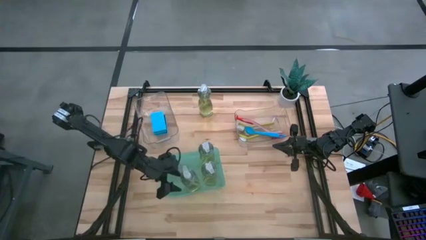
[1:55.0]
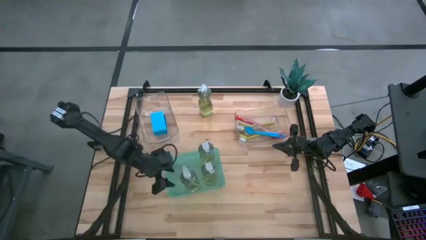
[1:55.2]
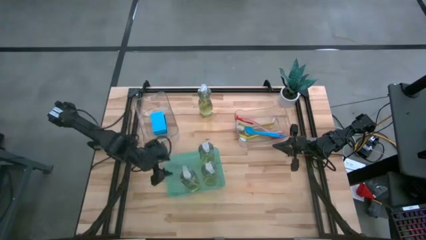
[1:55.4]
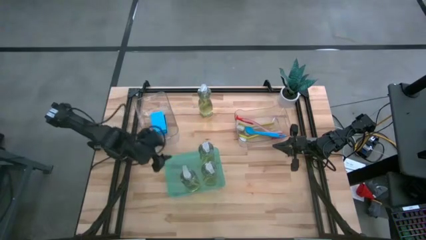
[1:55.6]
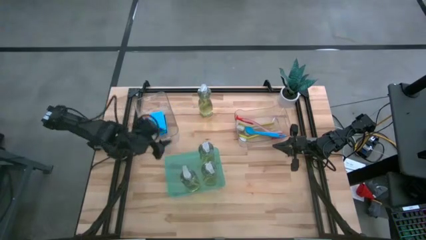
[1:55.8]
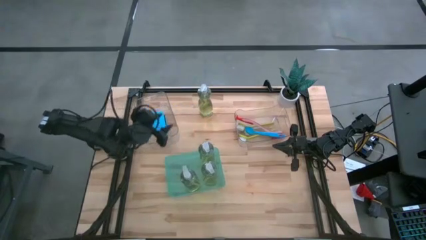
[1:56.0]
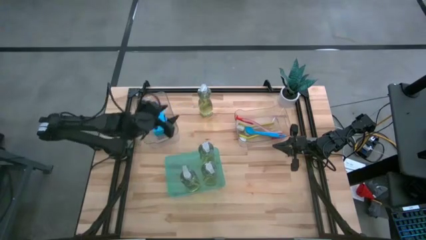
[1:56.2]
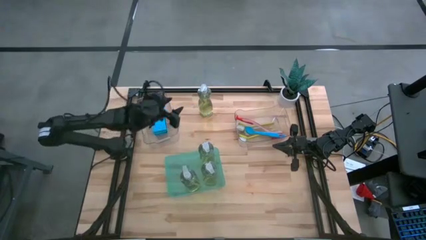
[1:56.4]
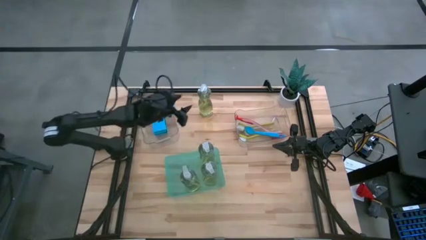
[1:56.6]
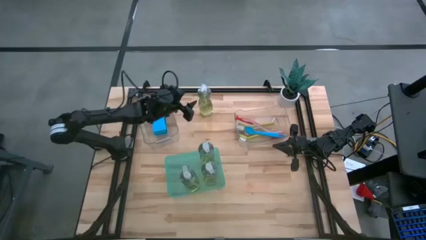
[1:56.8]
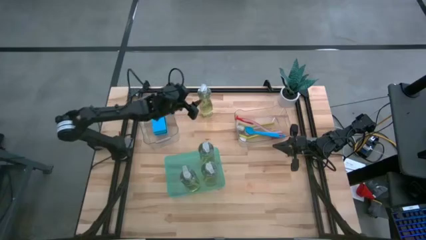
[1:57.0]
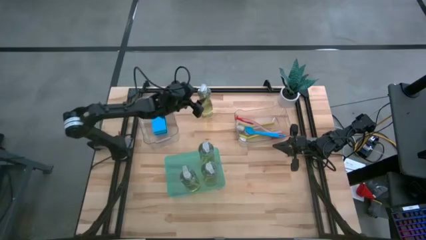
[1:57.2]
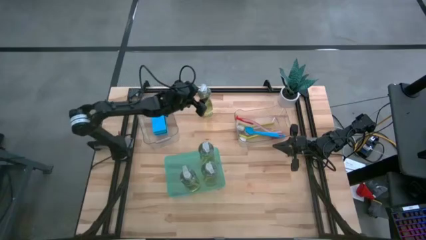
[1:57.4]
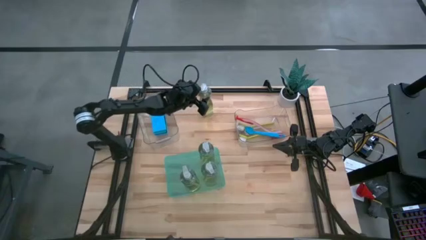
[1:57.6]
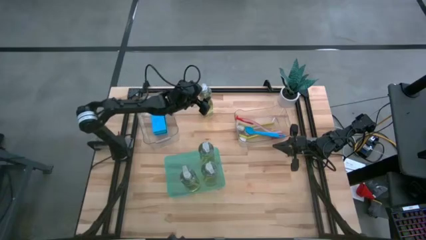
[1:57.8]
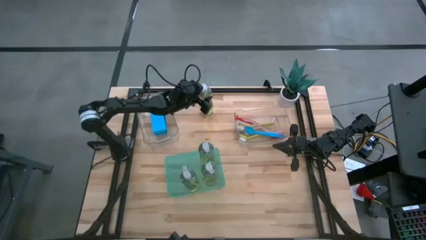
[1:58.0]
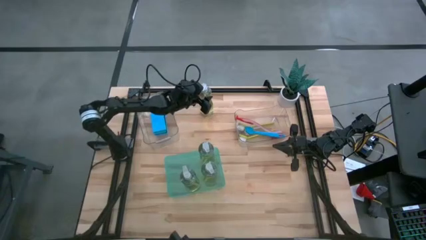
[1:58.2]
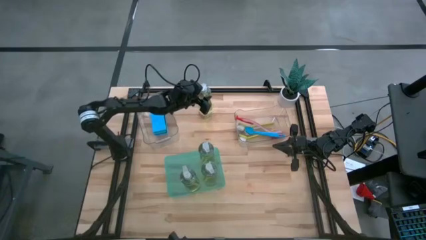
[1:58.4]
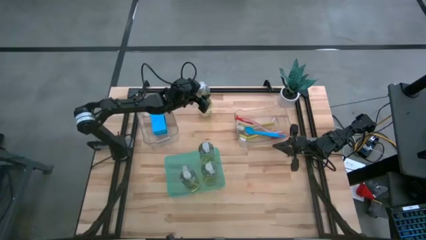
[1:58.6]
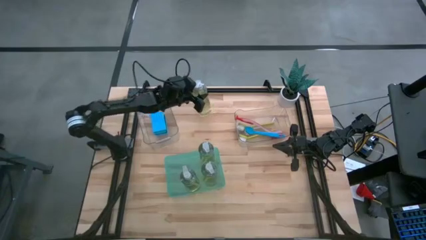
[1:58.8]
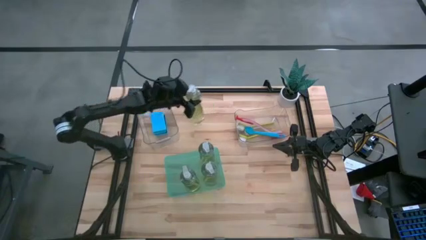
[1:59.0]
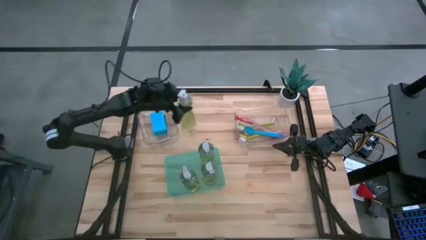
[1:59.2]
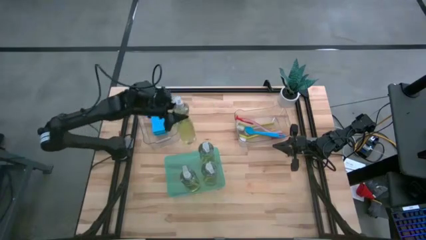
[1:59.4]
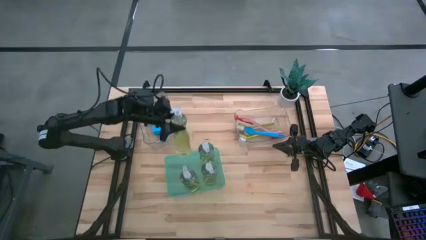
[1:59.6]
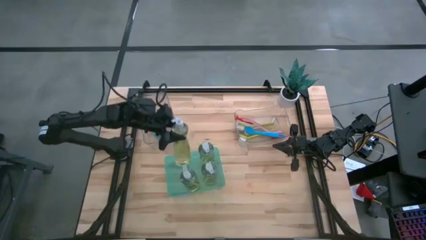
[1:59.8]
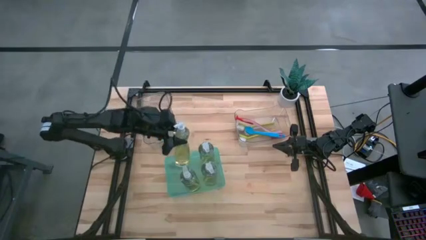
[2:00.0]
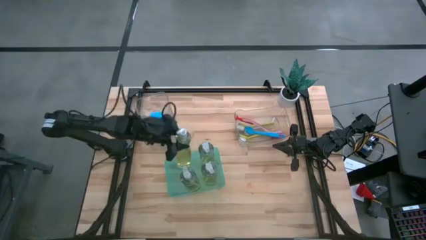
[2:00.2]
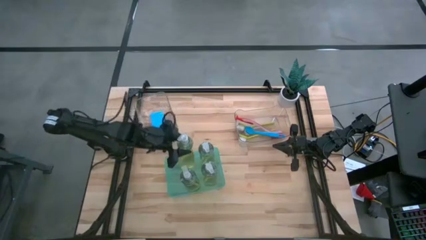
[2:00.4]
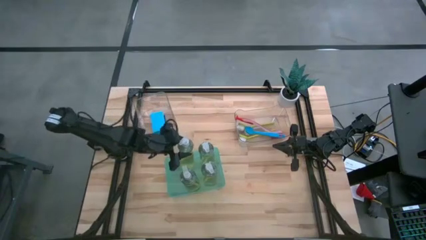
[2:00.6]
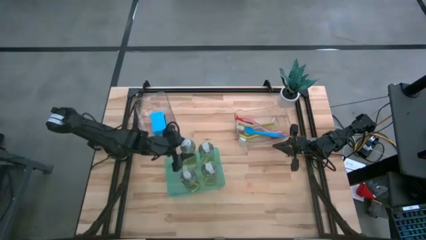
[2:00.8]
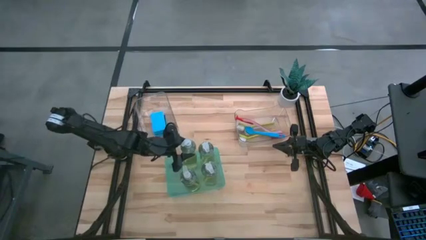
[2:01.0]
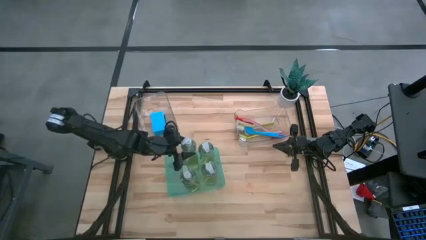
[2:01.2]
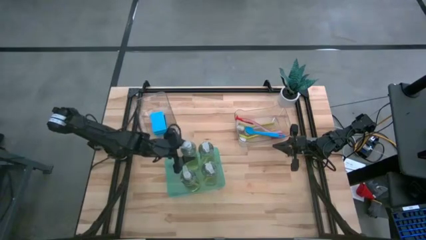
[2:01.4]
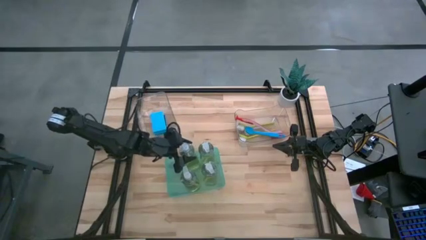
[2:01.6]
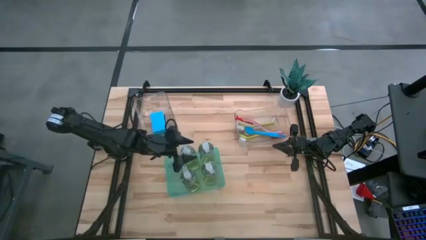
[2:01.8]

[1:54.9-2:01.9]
Task: Pick & Place Kitchen Sink Supplies
Put the green soap dispenser into the green bin

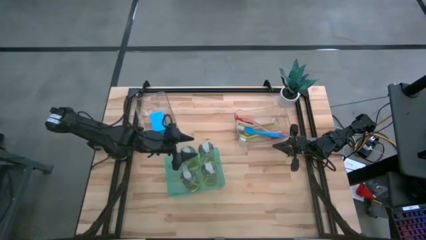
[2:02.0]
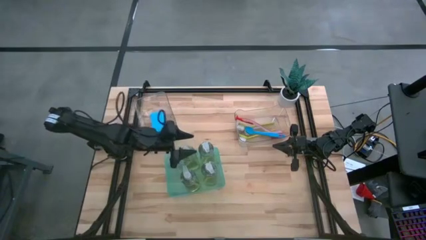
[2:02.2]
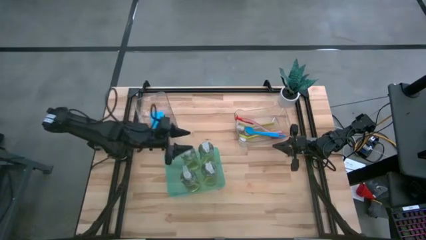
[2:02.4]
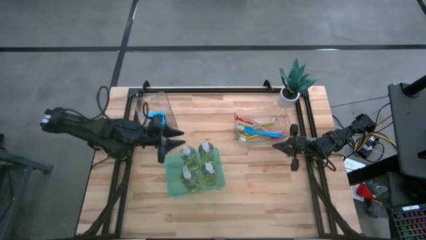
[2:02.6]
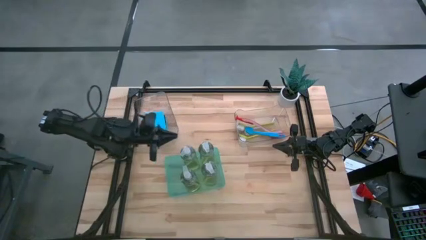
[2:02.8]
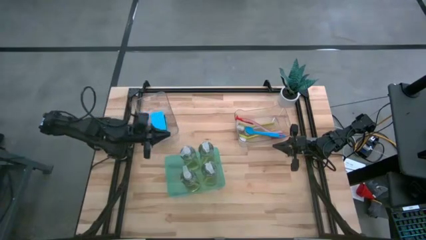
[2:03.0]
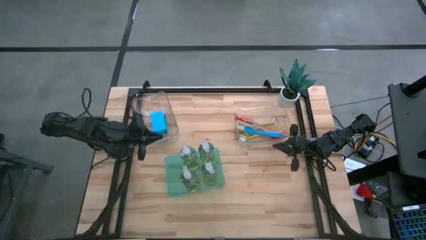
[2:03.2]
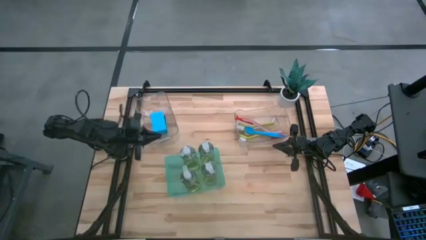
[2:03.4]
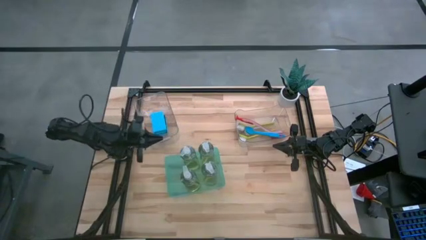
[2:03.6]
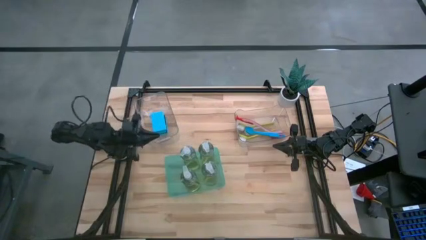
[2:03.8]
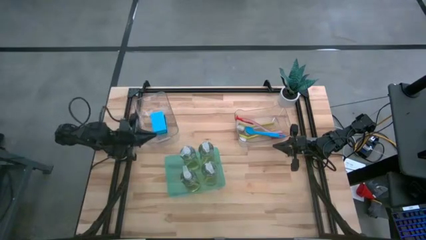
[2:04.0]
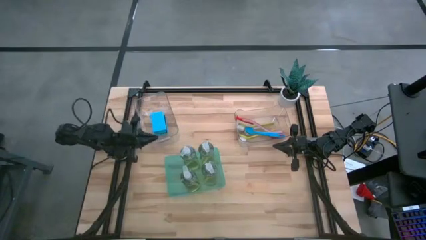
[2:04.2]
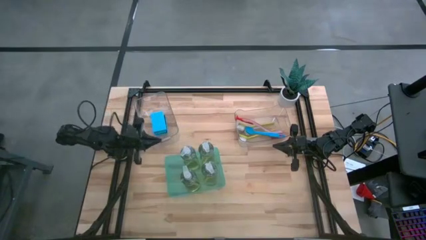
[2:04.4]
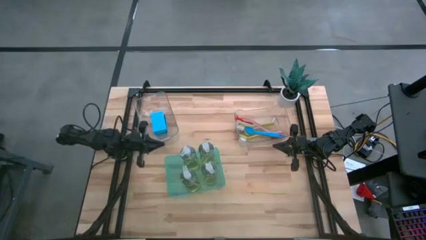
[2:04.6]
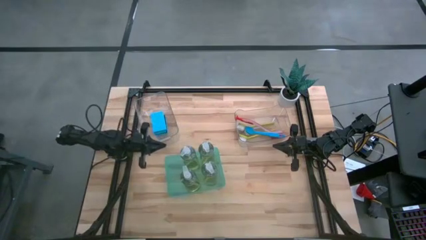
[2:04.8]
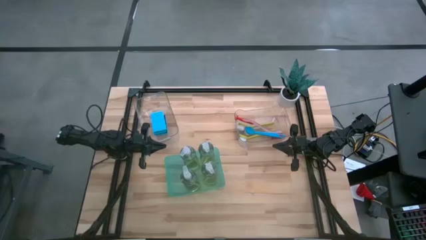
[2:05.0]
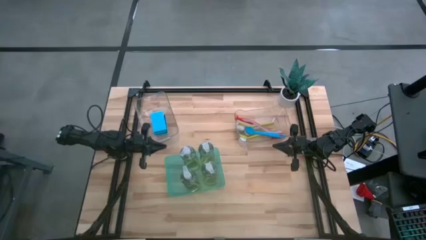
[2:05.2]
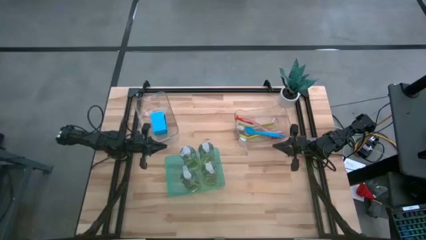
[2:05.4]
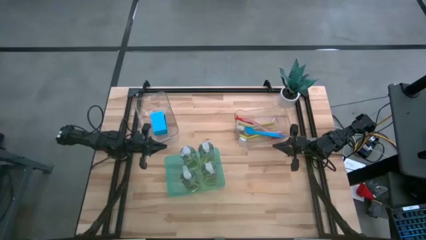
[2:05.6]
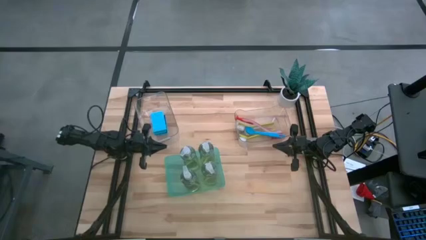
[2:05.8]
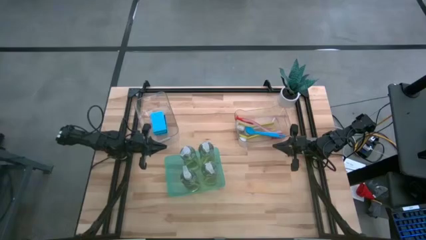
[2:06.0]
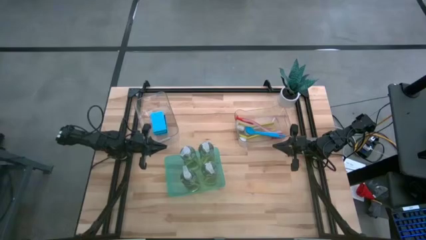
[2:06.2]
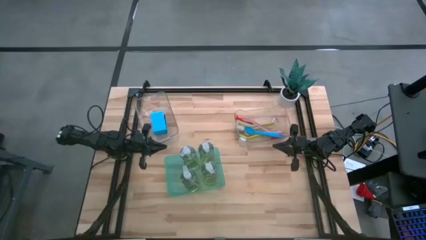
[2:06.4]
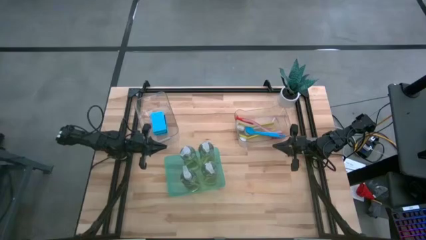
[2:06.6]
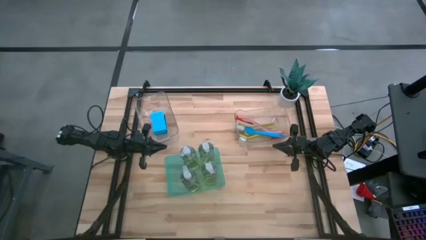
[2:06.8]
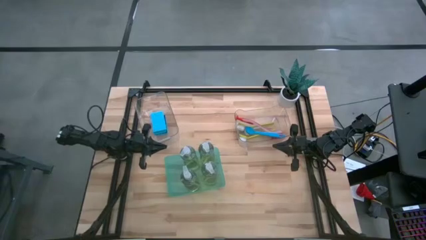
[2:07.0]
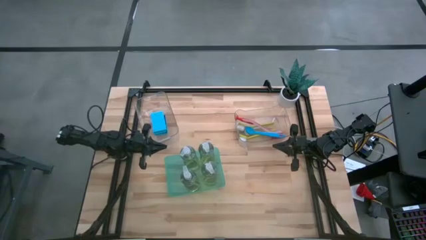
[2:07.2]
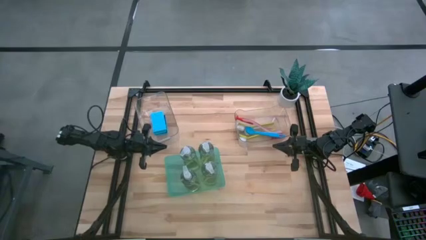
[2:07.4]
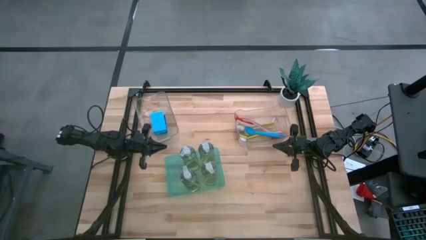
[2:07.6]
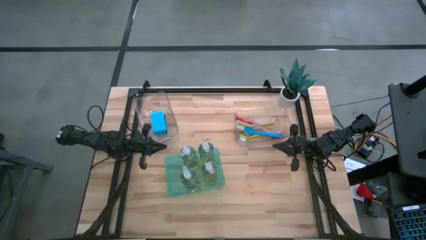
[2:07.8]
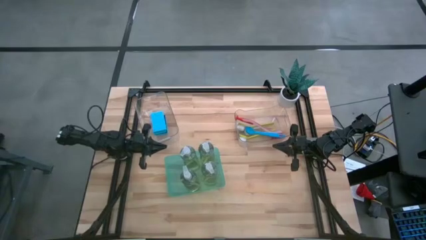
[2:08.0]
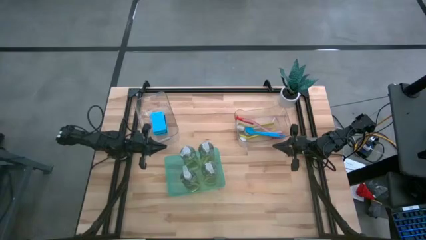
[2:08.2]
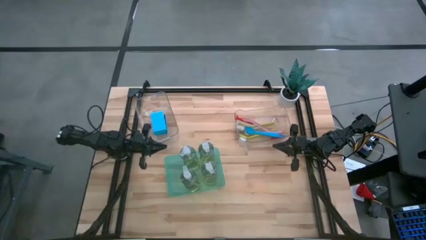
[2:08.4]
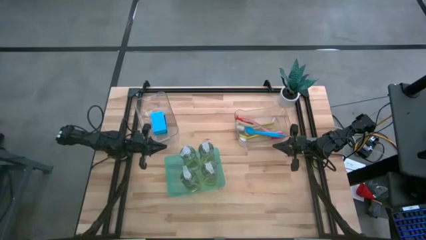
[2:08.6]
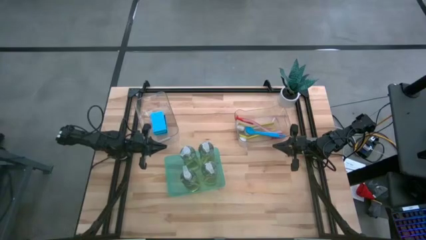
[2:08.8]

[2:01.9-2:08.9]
Return to Home Position

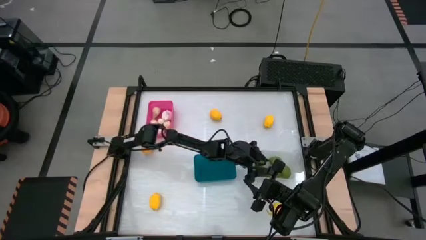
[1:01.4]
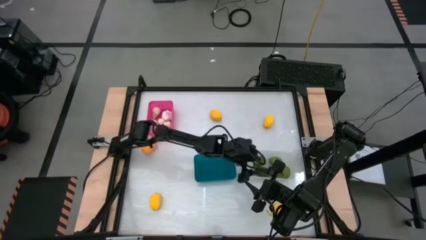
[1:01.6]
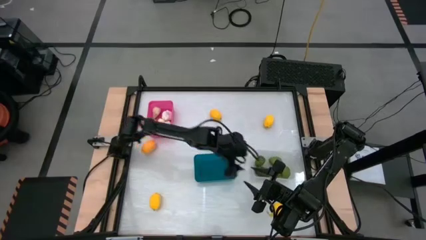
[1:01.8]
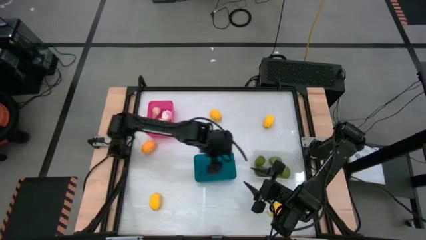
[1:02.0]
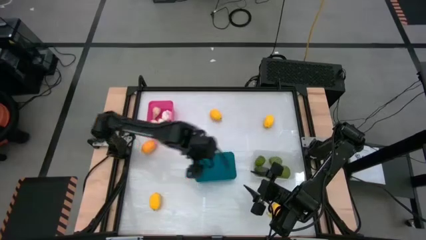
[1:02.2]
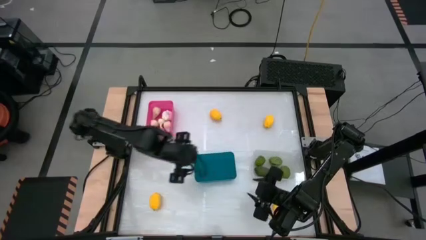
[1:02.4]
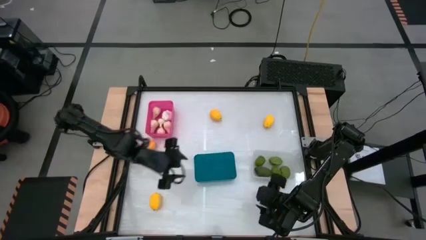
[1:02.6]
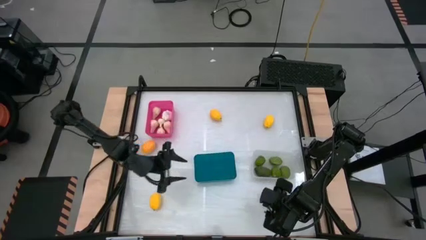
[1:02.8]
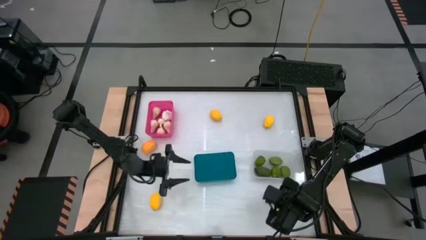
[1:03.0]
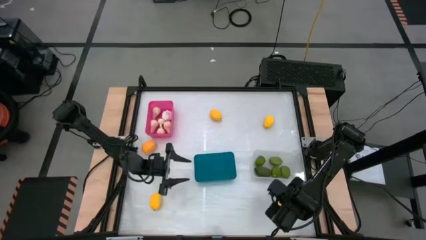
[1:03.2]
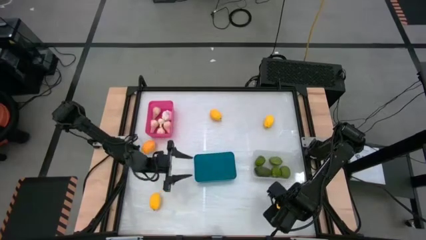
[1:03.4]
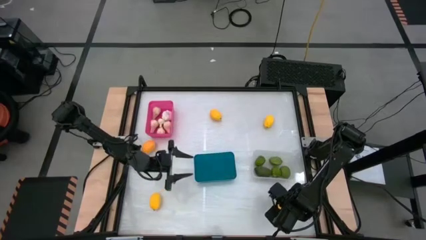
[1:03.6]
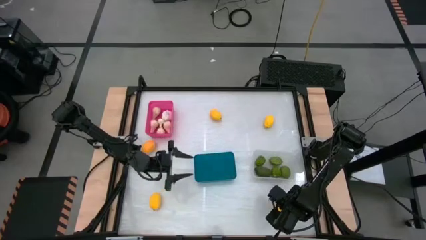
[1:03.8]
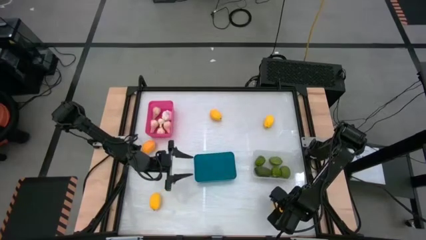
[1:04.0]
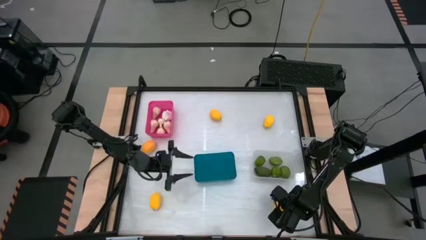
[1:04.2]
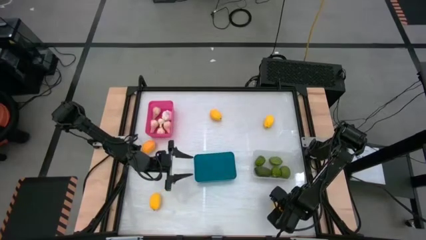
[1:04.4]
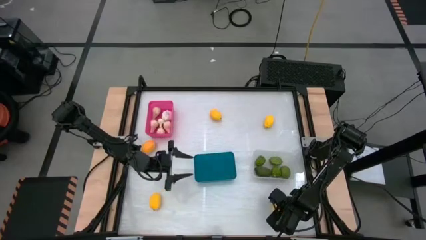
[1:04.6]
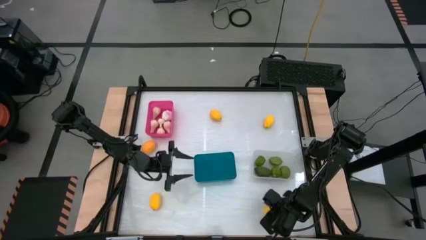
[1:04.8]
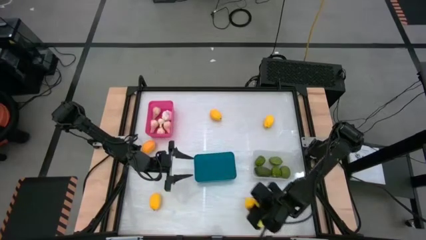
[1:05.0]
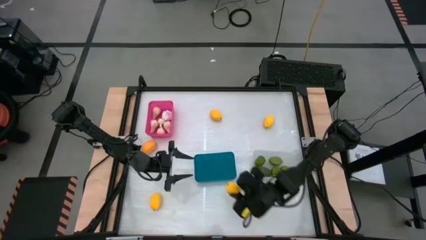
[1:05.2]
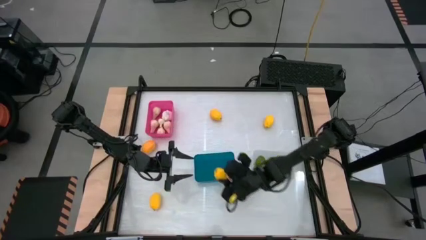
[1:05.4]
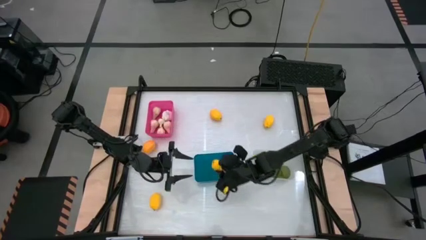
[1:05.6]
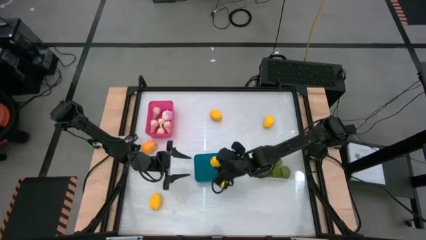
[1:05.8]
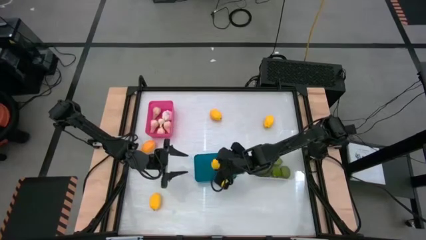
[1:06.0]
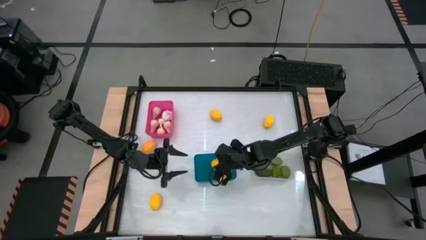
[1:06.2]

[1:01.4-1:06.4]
Task: Sort produce into baskets
Put the yellow lemon into the blue bin
